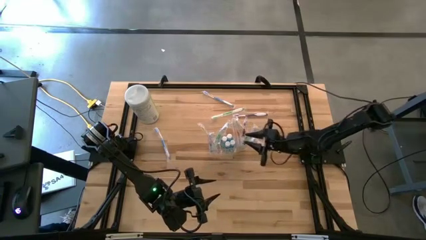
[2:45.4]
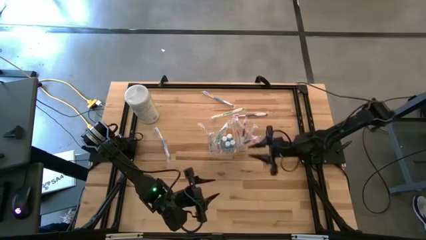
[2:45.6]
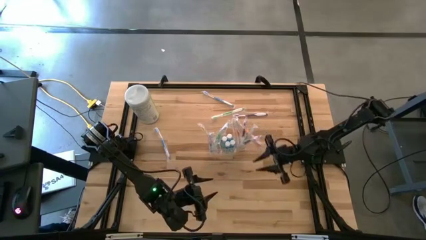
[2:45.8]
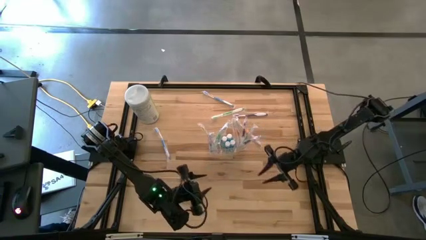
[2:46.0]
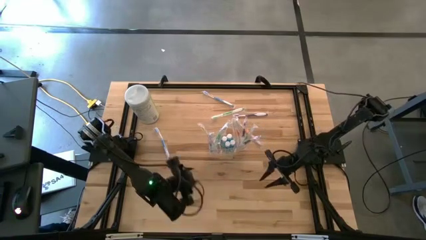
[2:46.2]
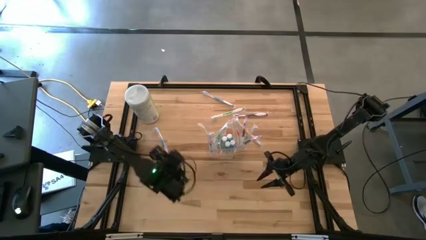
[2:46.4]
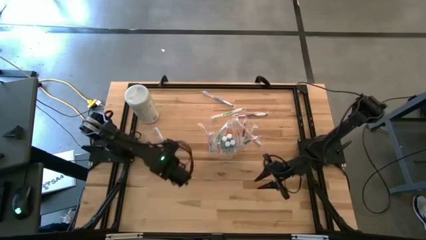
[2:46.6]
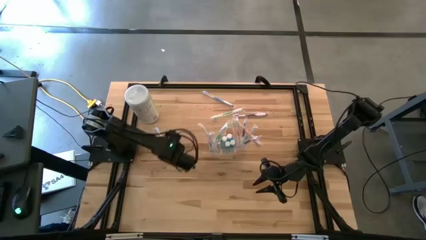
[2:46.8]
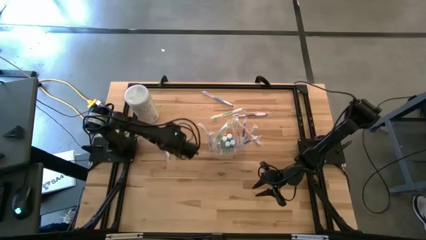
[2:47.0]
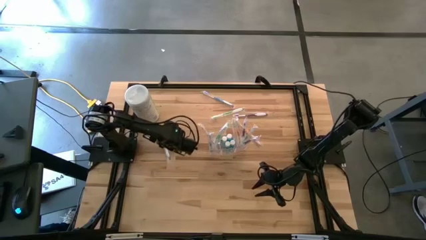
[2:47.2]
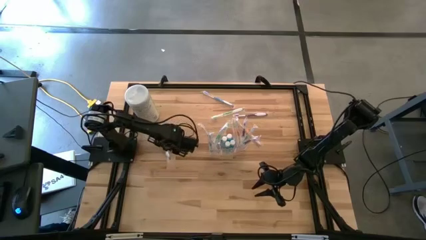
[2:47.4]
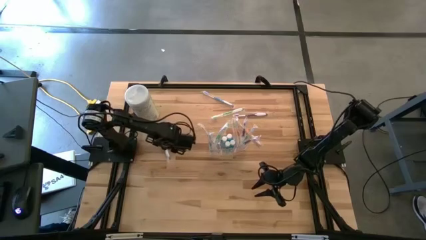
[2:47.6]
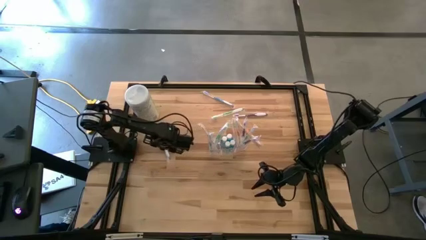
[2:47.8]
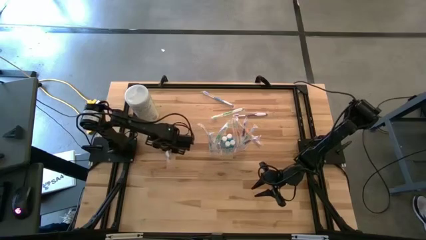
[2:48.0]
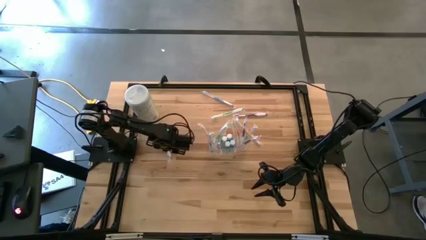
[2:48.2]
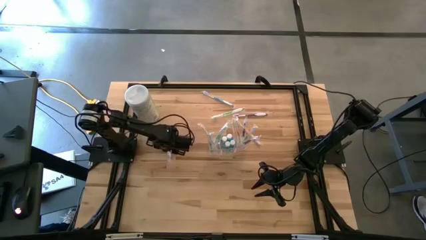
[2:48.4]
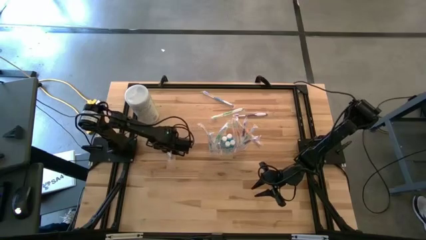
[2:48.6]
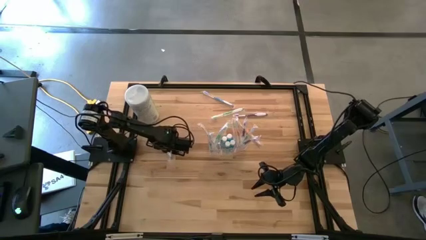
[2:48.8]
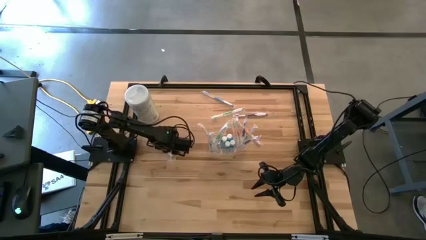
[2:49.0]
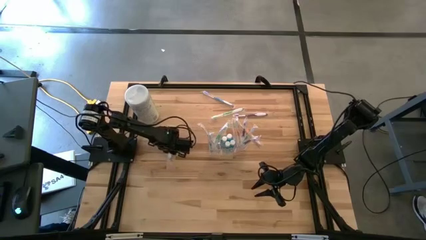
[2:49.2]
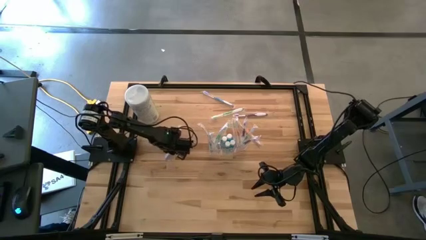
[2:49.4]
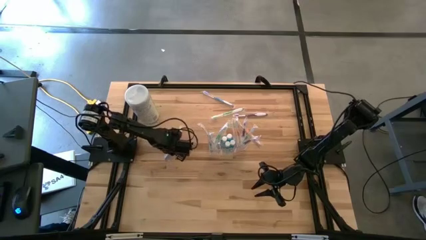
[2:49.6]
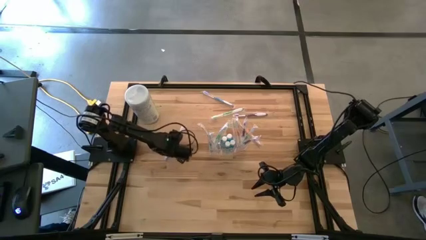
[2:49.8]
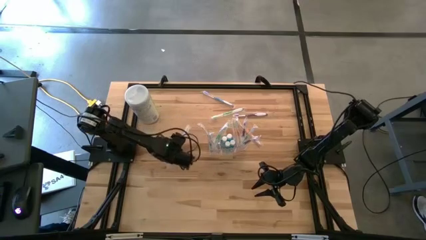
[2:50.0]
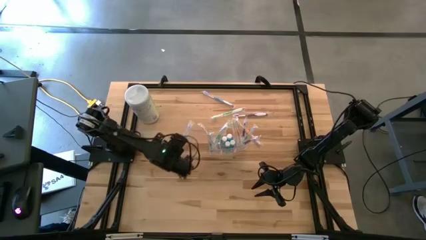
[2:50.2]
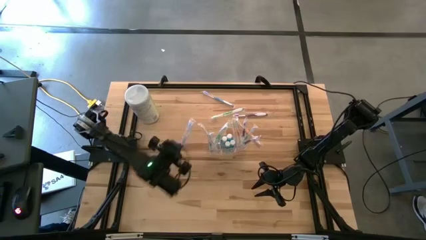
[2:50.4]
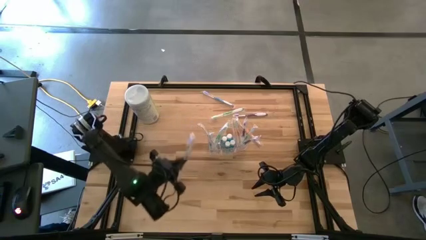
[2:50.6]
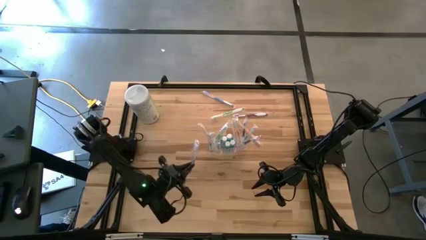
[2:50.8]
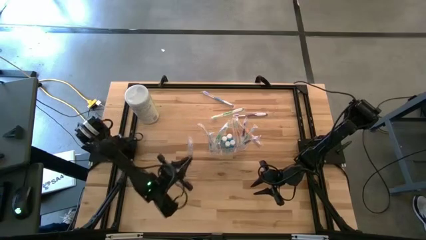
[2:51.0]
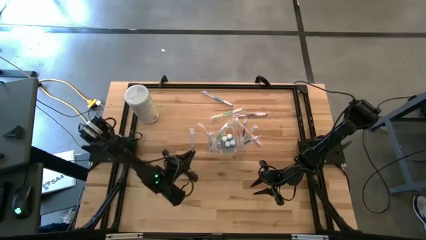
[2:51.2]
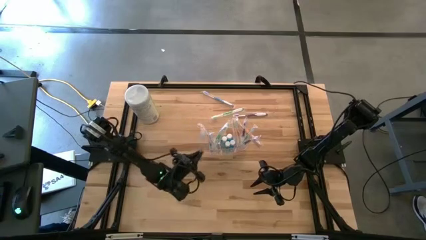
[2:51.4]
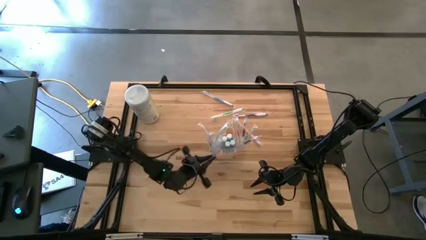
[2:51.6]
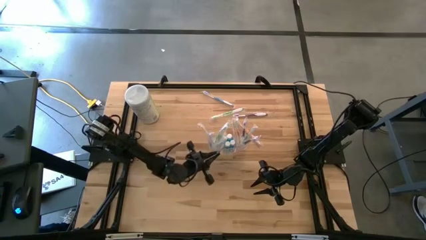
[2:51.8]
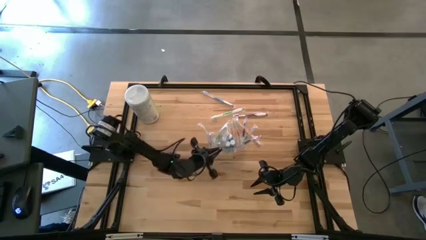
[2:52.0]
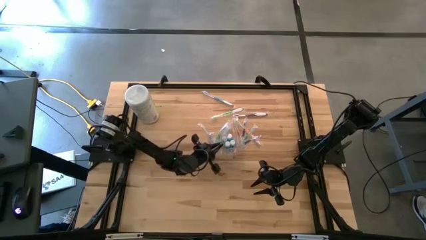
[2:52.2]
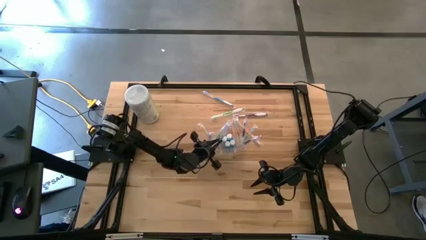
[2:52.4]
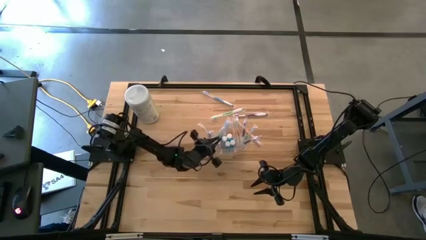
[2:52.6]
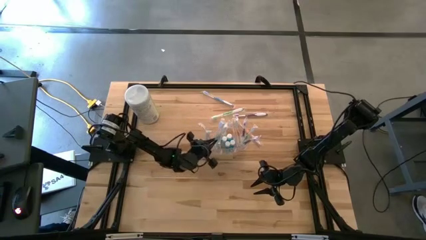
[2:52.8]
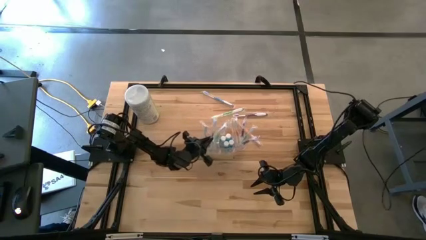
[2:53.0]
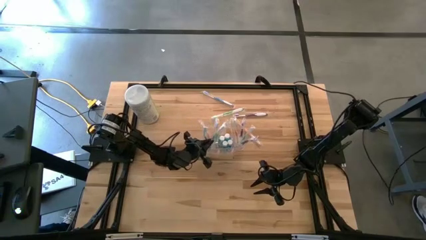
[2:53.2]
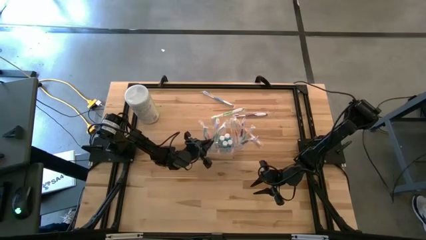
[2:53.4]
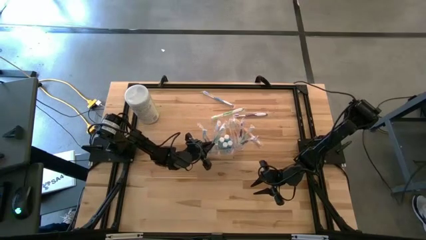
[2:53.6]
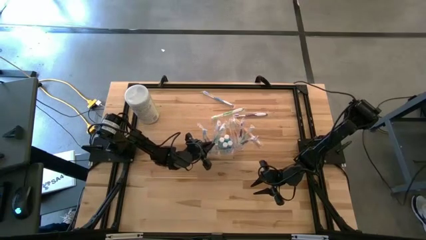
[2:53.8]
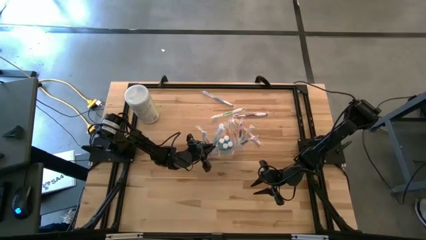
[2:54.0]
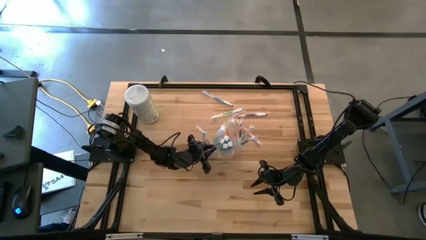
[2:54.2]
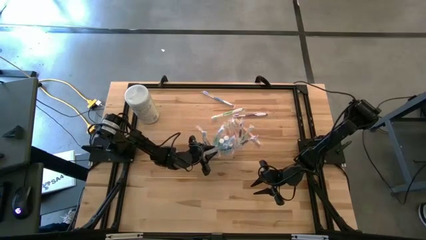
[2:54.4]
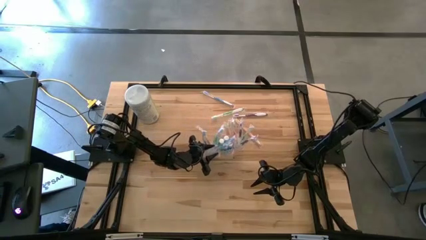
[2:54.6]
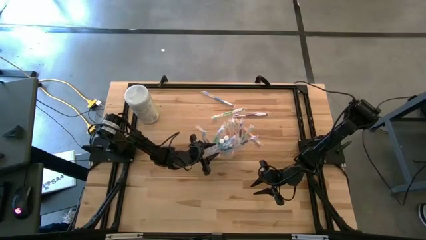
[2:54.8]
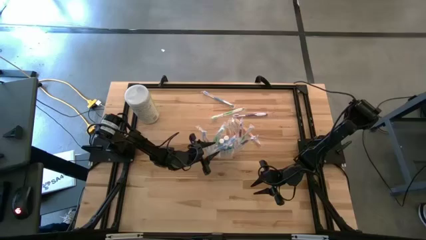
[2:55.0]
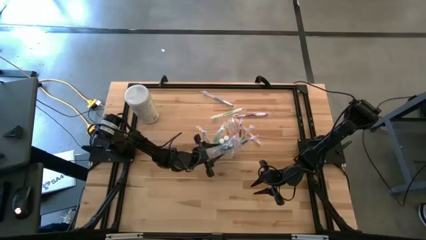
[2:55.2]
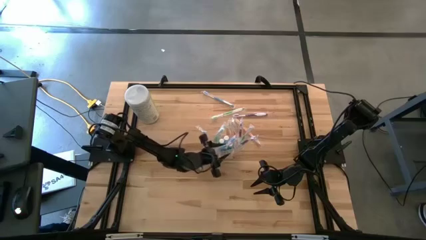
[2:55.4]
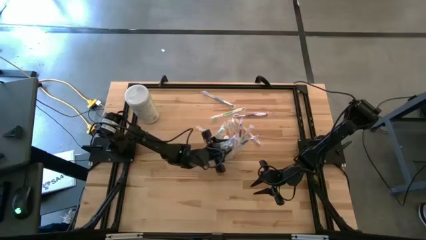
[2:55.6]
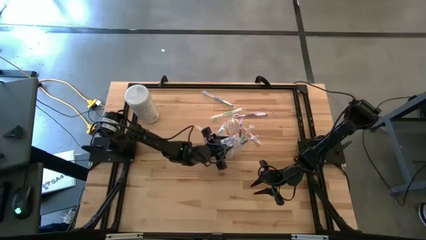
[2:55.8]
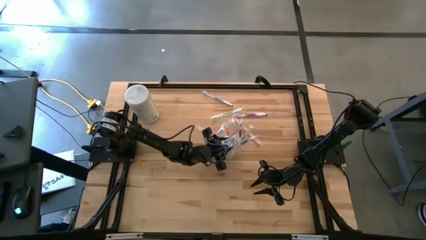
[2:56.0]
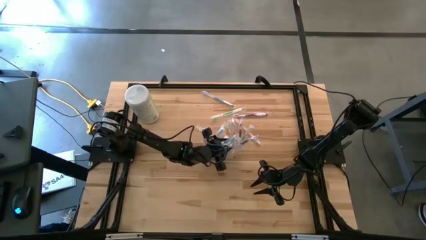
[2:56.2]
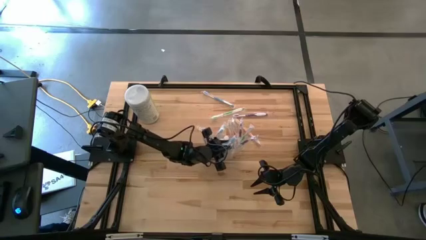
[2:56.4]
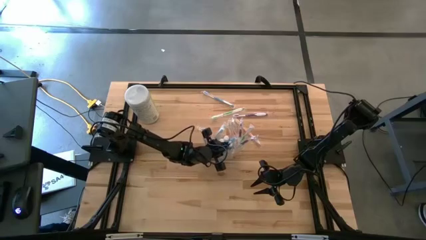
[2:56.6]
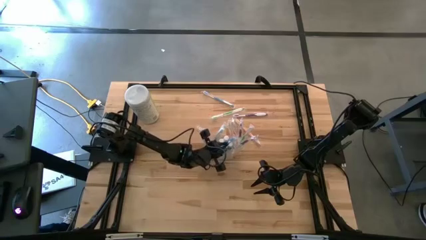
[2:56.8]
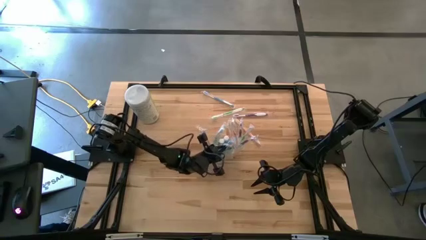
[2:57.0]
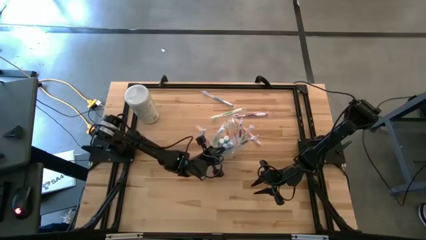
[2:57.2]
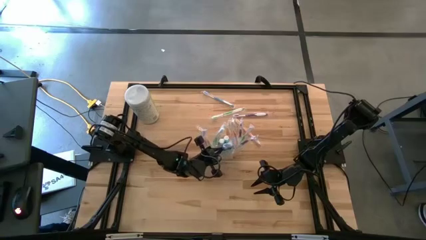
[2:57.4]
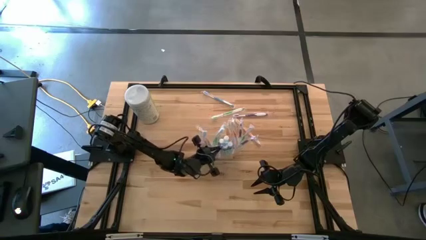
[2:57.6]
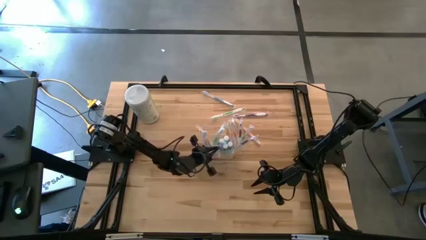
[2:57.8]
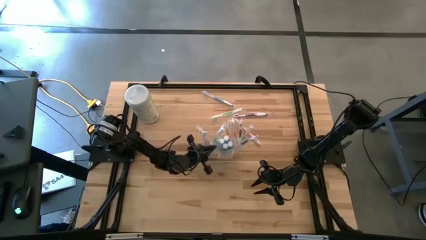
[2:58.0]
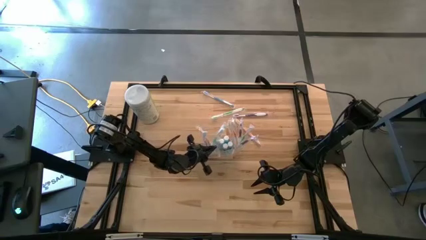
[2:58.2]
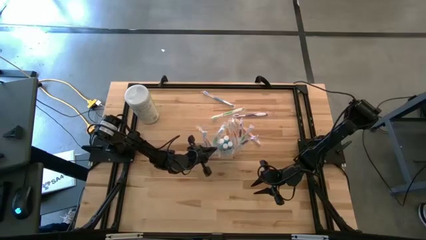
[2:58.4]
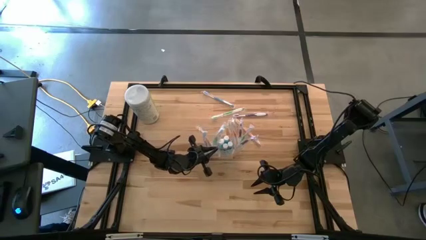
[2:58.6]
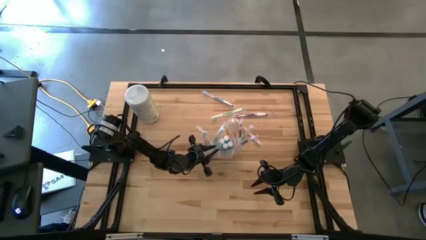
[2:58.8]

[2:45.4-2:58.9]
Task: Pick & Place toothbrushing station
Put the blue toothbrush into the transparent organizer

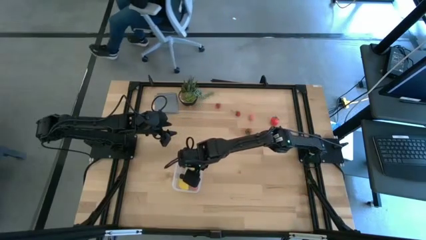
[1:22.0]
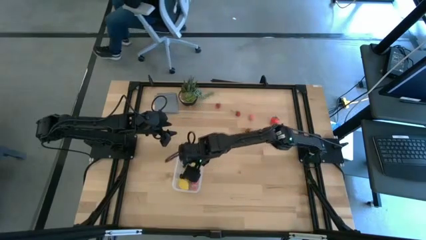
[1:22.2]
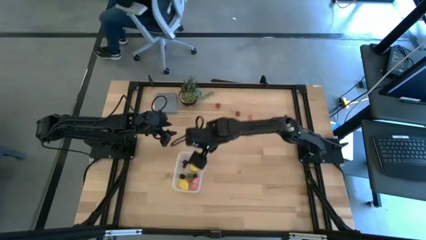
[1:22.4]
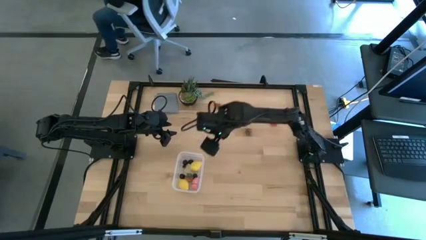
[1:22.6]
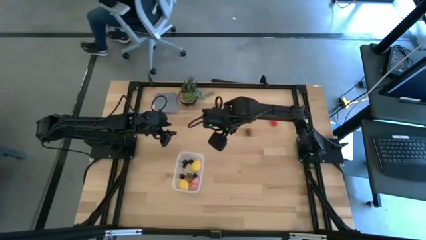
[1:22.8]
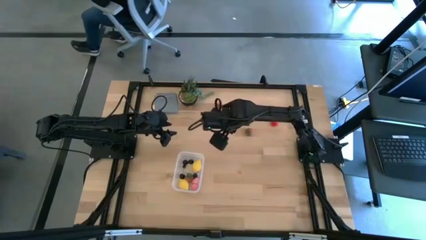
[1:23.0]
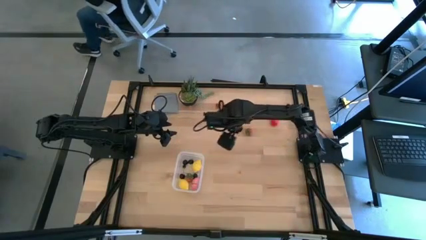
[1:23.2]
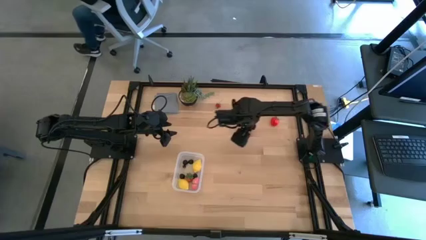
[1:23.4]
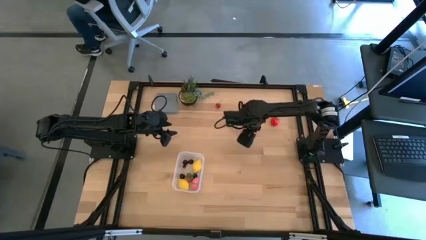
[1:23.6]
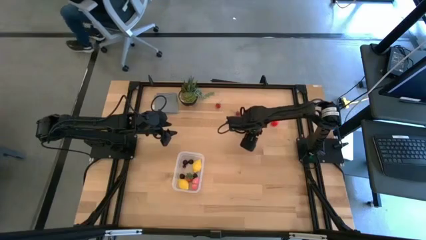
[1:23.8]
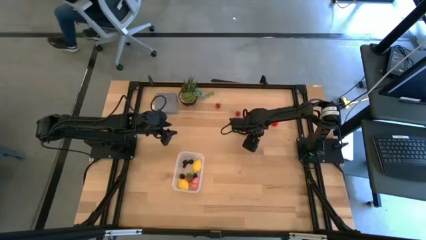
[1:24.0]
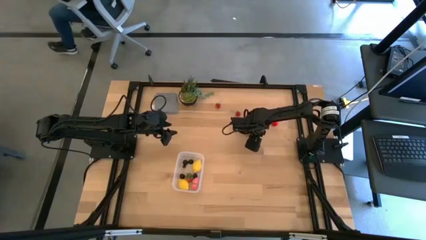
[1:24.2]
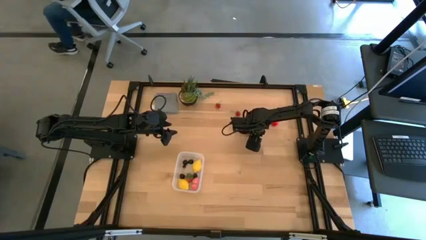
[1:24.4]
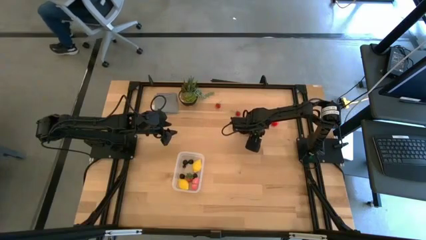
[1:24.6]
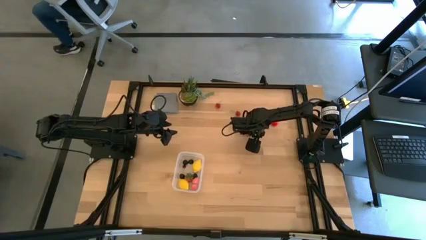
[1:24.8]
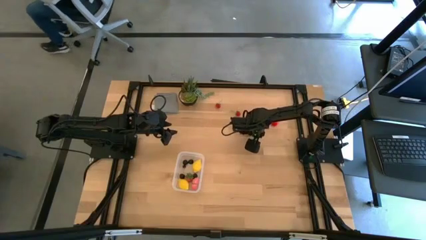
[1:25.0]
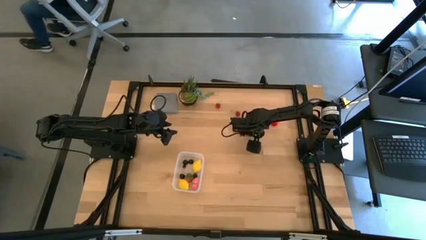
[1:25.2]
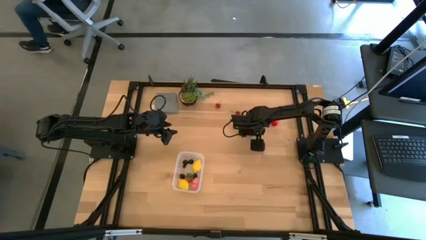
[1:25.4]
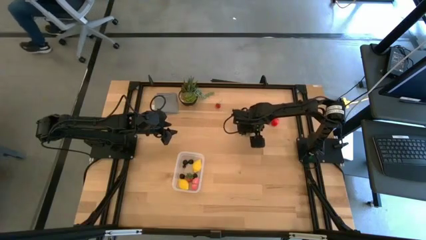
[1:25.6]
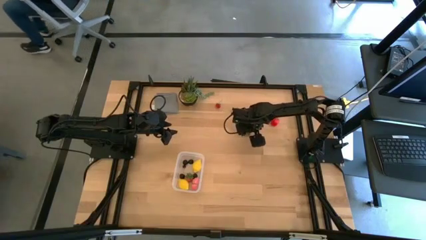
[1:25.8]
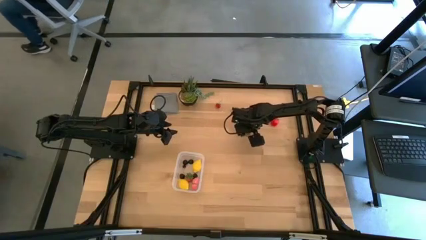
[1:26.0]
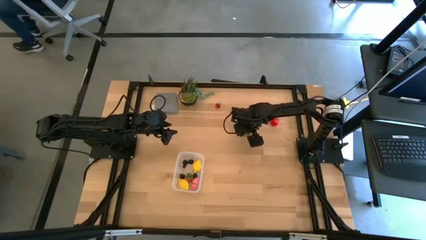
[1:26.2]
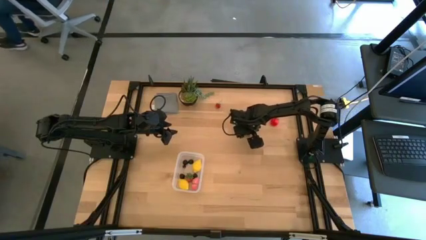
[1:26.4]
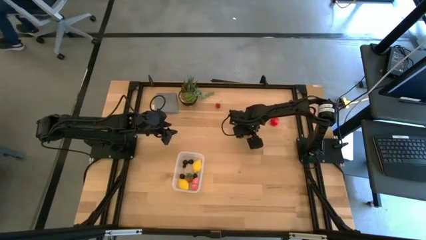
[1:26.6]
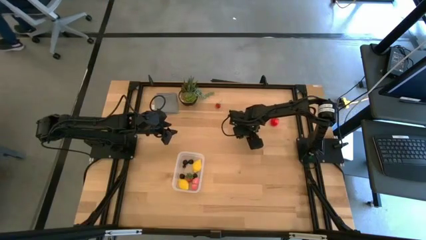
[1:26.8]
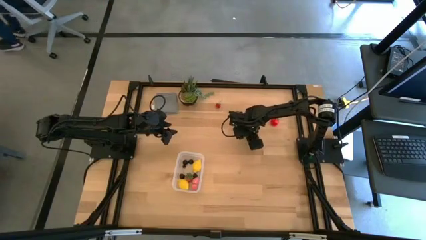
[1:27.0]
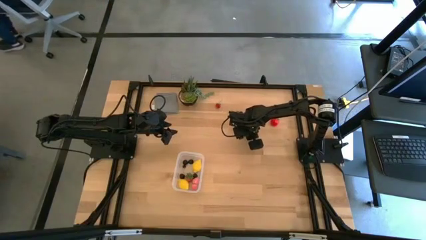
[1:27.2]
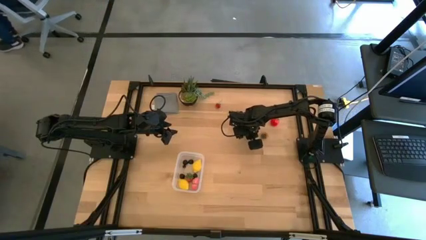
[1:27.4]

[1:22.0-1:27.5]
Task: Pick and placing Produce into tupperware
Put the red strawberry into the transparent bin
